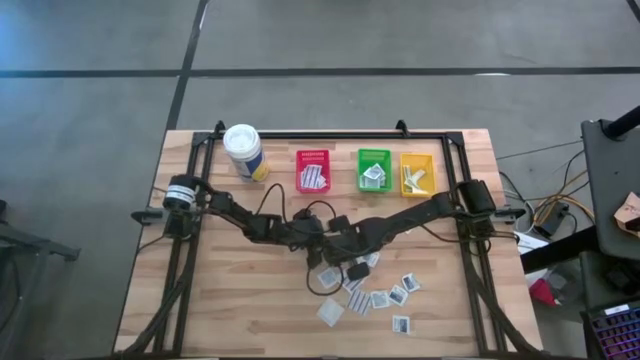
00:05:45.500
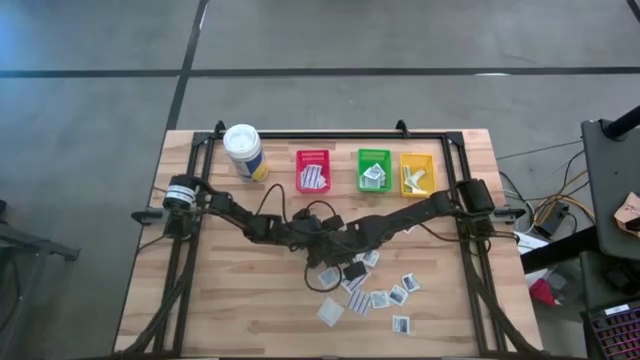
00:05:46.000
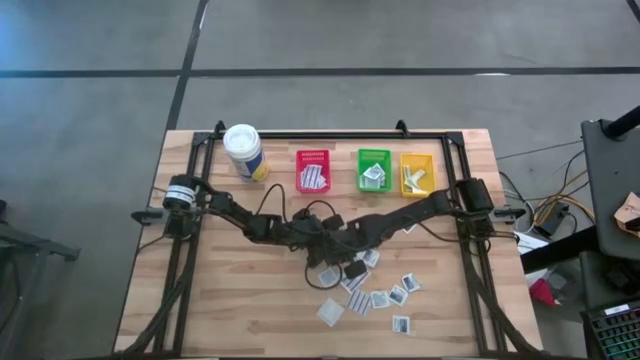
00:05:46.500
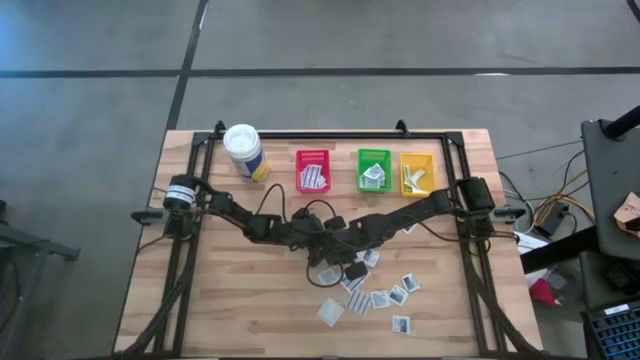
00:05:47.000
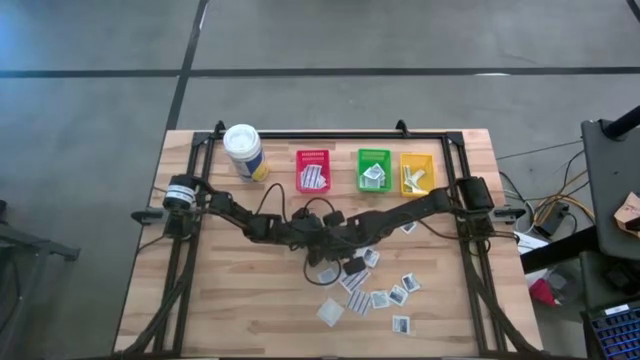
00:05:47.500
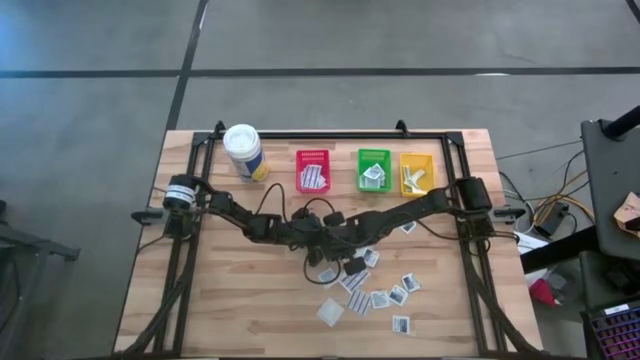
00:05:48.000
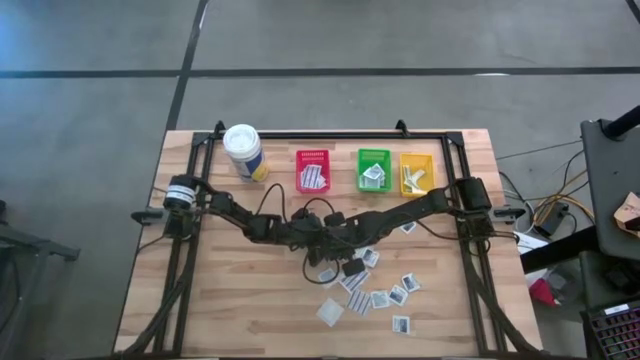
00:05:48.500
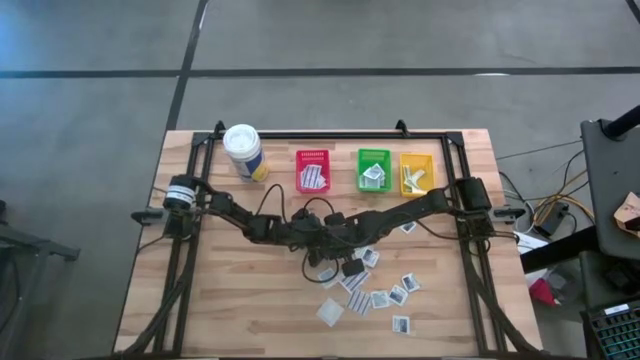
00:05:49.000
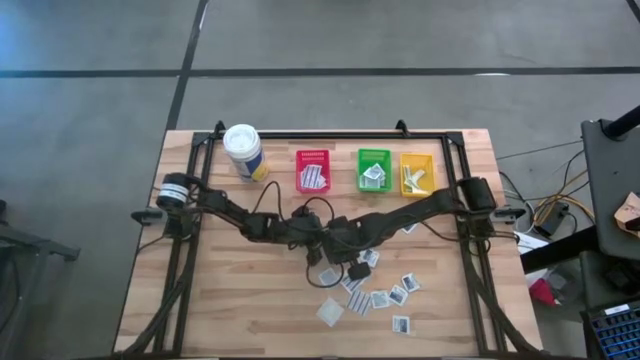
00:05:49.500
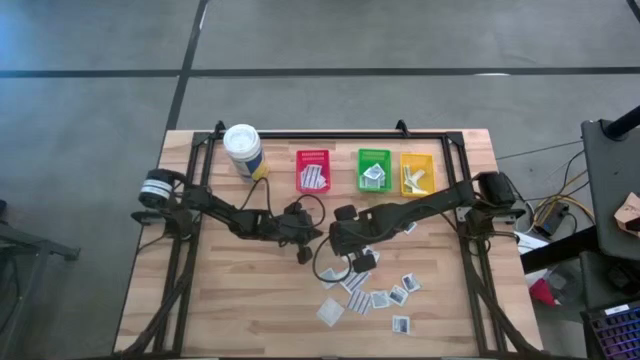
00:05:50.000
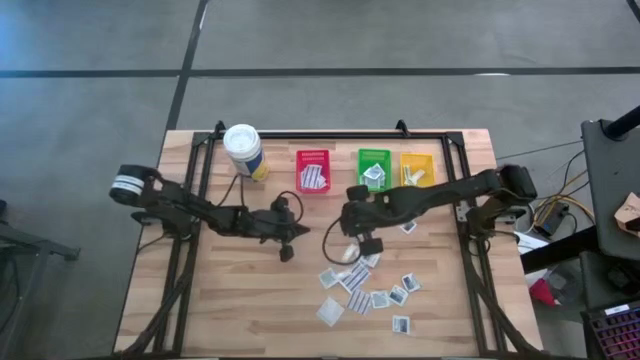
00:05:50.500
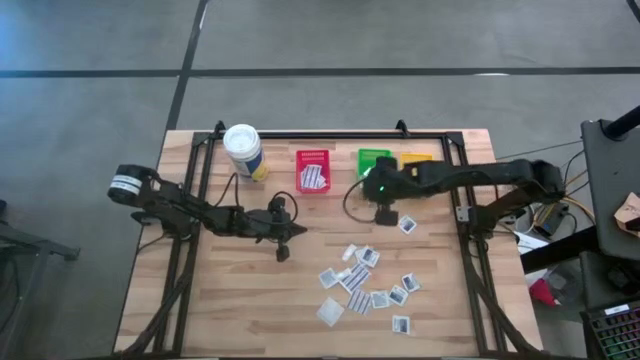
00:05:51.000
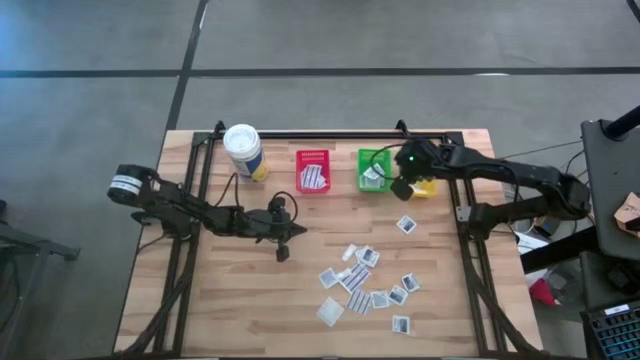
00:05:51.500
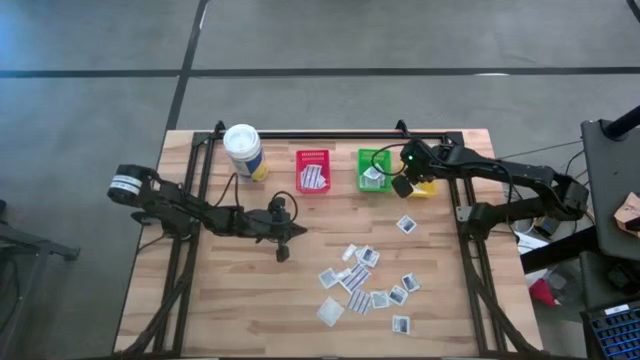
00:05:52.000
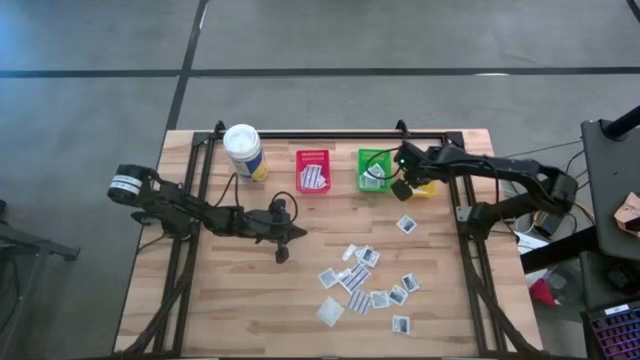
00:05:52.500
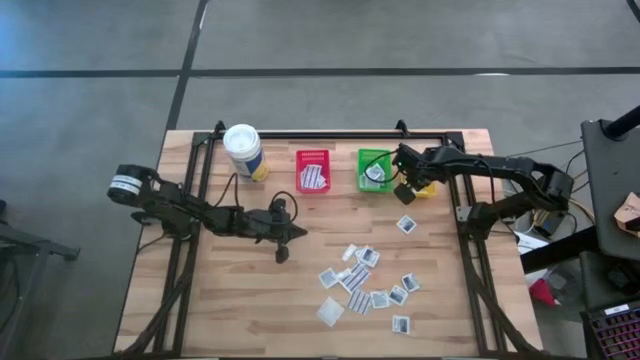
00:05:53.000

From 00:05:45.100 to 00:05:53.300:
Task: Pick & Place First Aid Supplies
Put the alcohol pad in the green bin

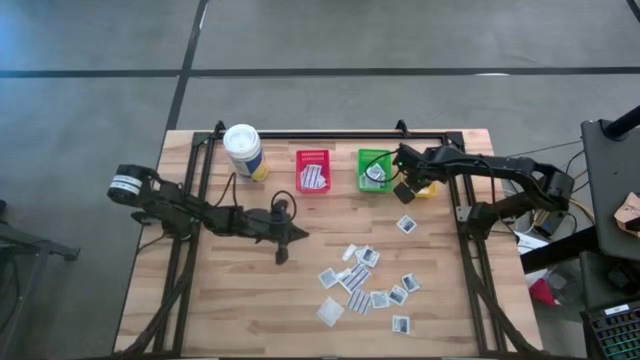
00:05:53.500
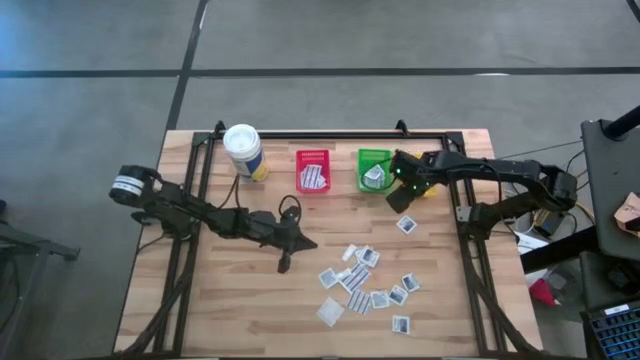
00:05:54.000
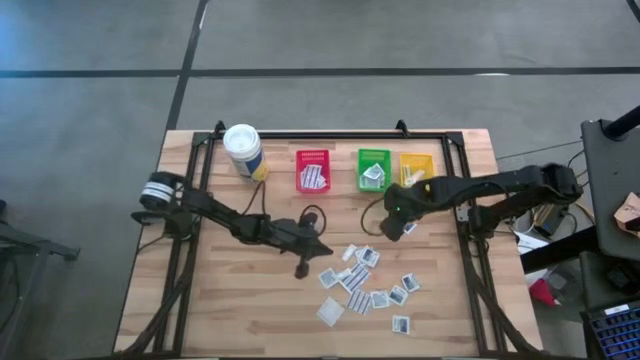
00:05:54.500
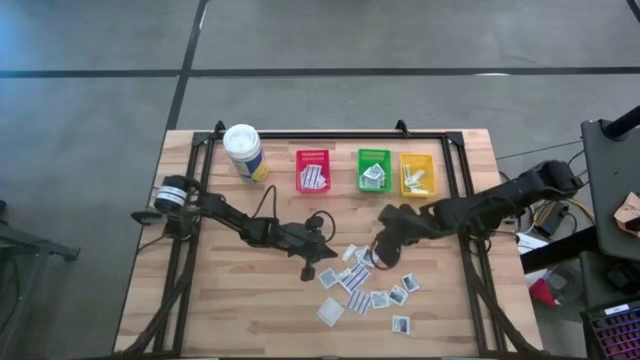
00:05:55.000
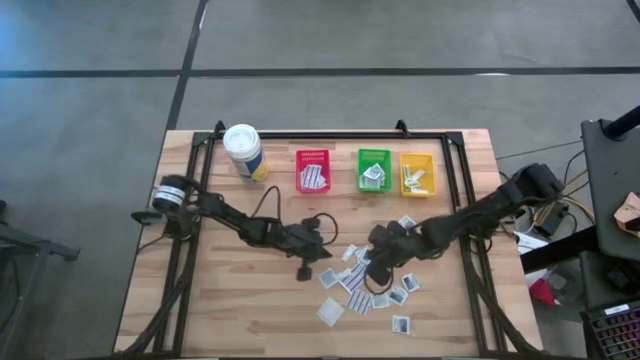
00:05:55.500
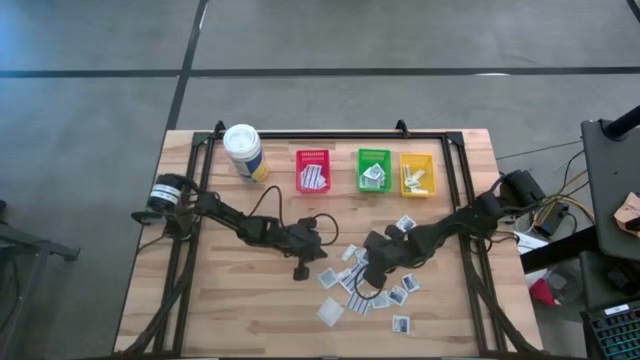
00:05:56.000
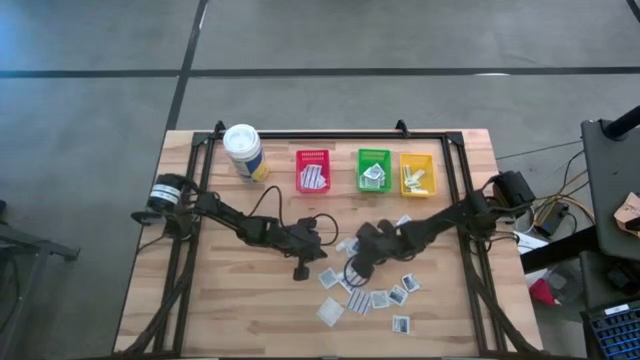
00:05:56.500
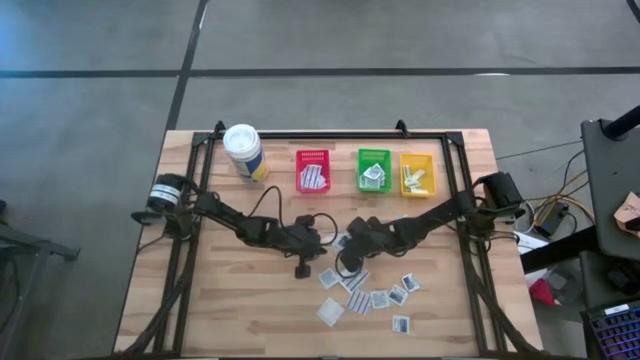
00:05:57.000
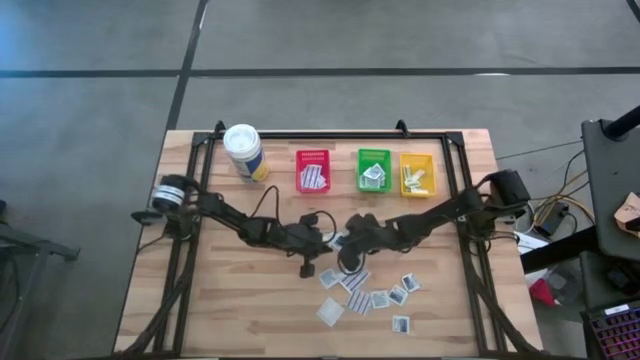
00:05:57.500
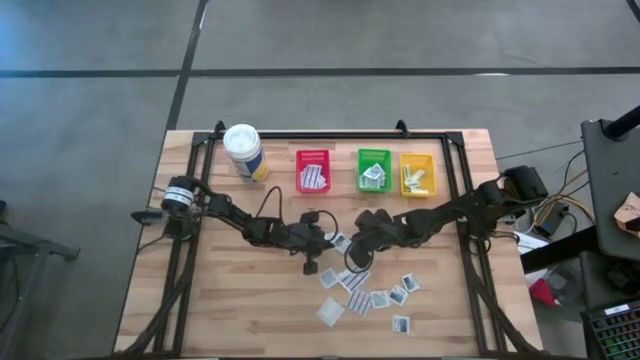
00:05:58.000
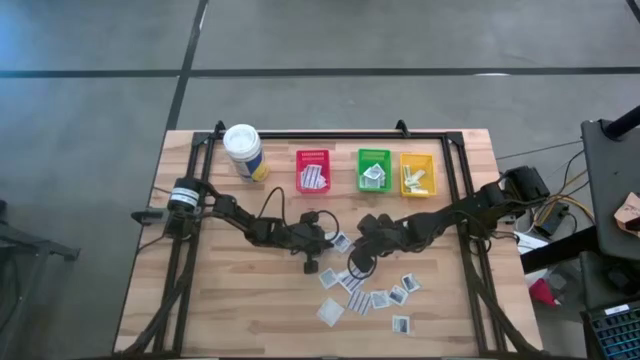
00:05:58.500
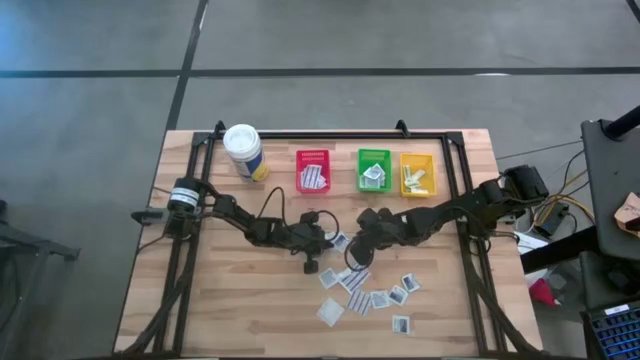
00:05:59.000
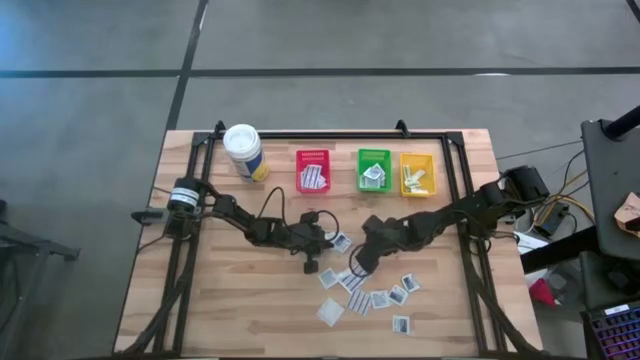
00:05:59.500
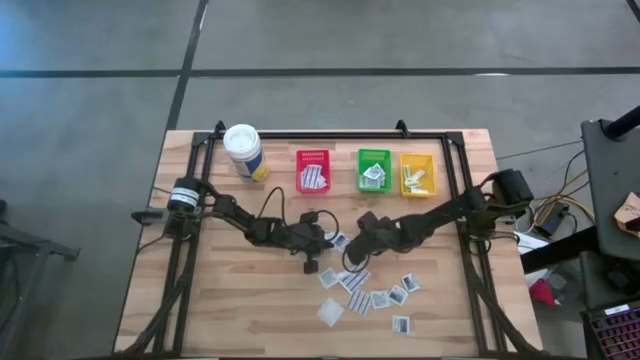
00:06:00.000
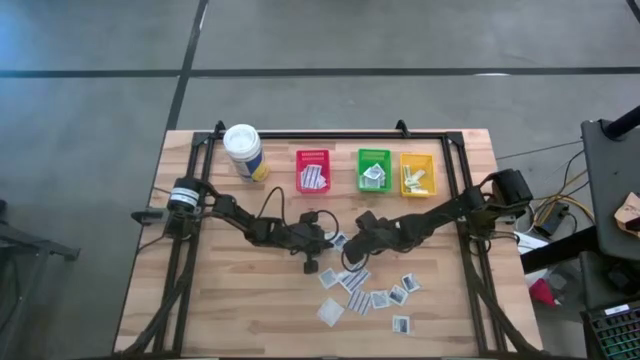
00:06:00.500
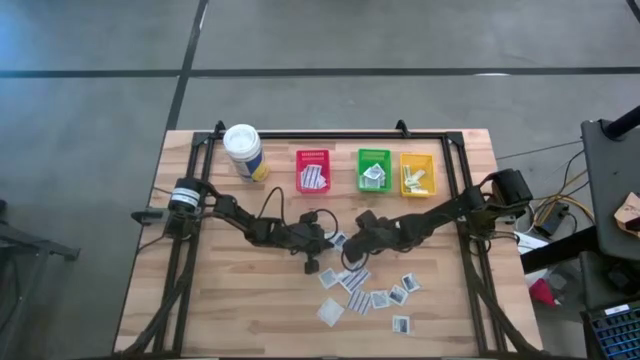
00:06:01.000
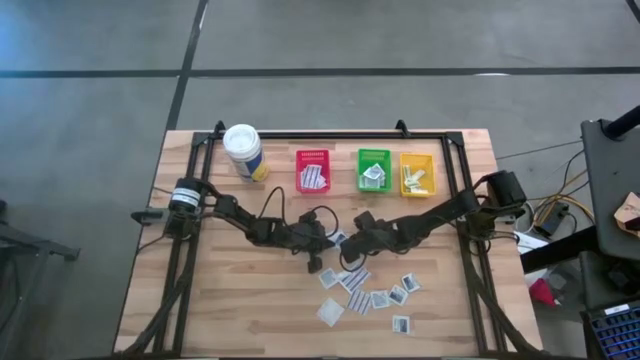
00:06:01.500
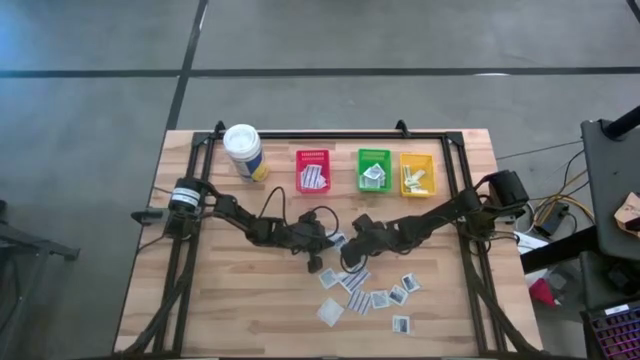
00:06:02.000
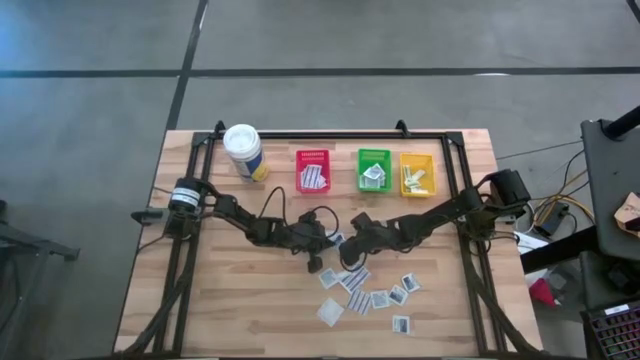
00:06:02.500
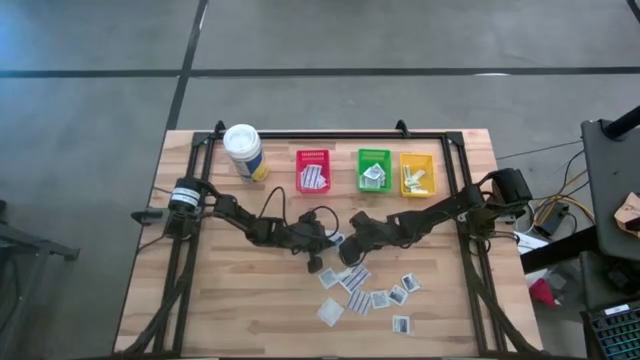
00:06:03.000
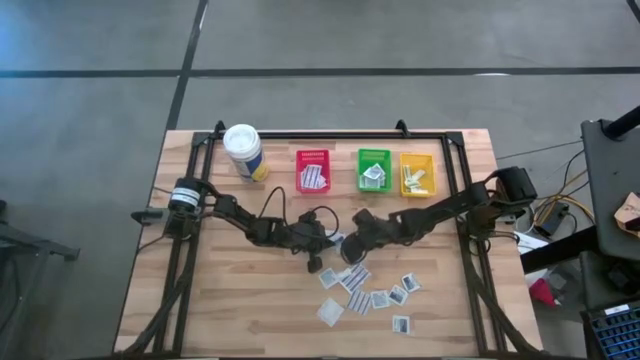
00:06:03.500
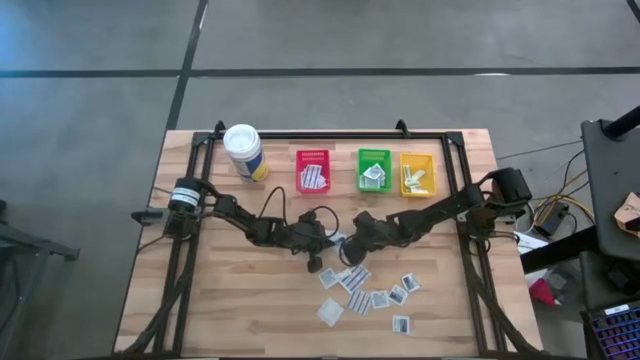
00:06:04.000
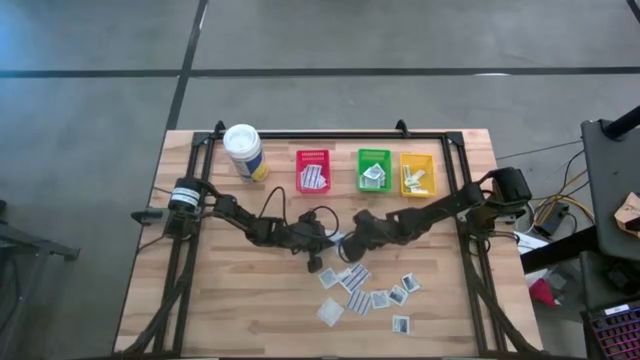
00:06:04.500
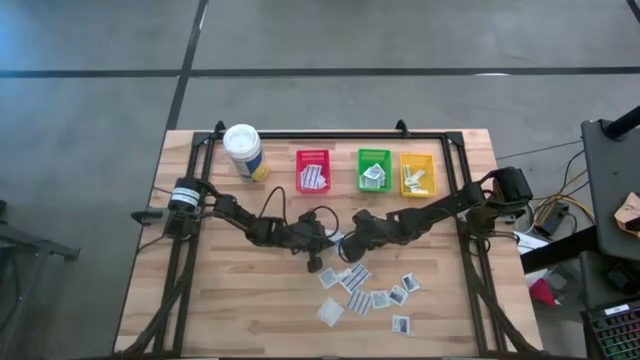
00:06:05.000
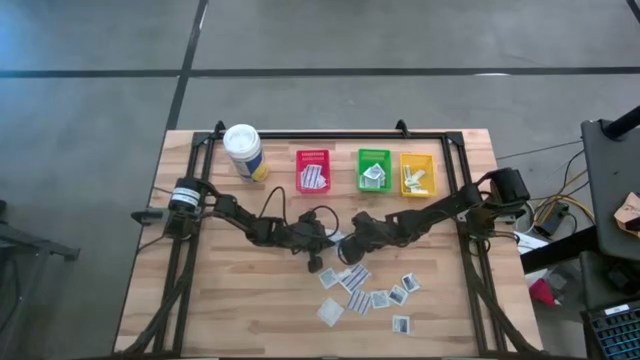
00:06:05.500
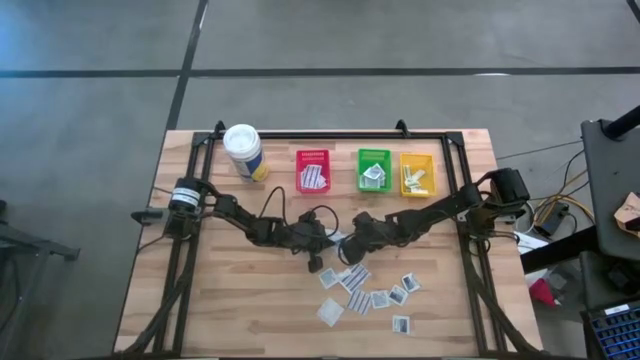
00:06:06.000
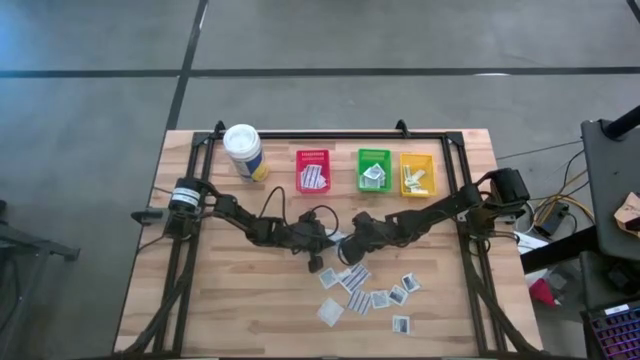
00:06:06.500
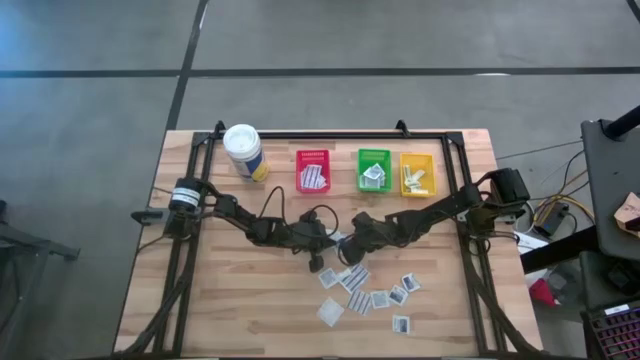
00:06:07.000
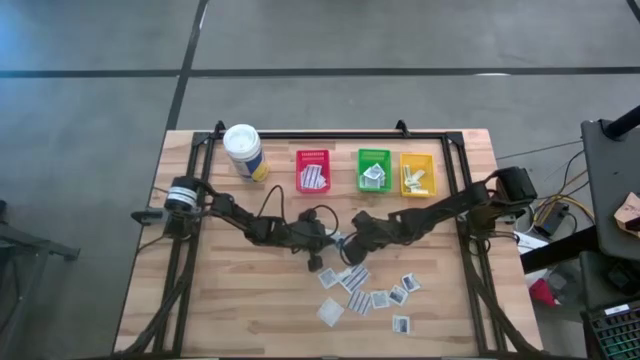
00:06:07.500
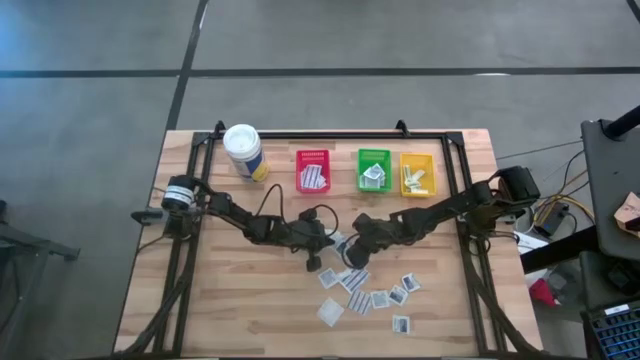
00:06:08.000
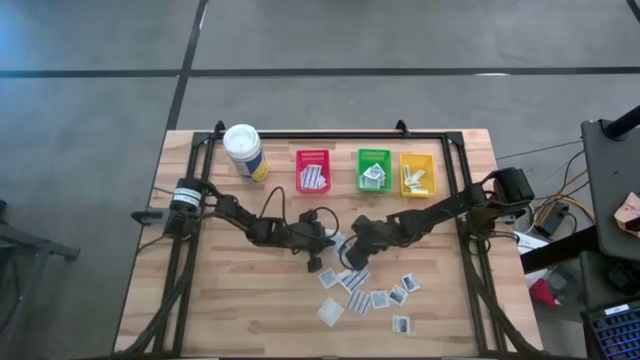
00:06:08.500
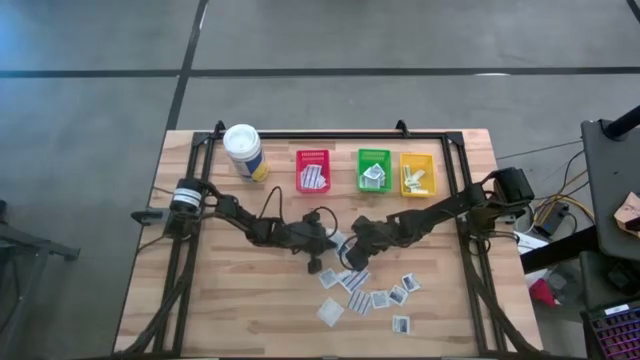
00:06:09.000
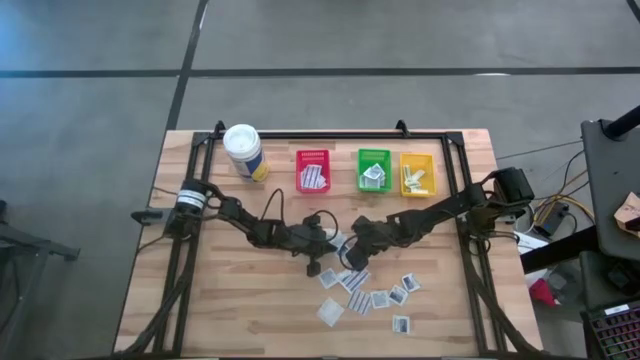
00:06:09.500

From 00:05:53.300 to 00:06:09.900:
Put the alcohol pad in the green bin
